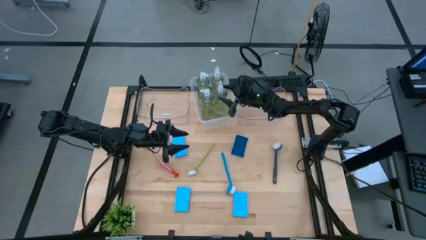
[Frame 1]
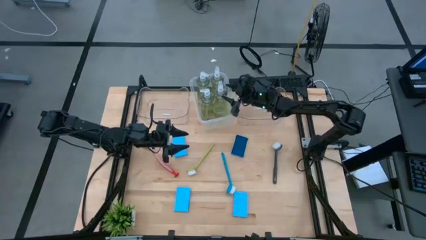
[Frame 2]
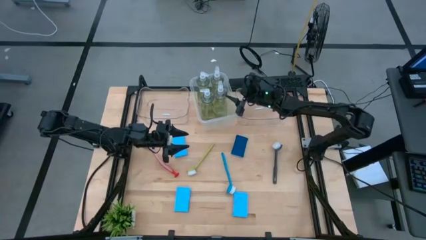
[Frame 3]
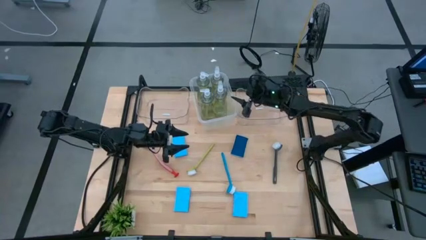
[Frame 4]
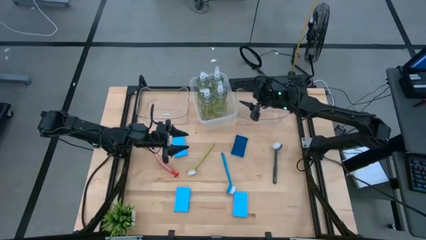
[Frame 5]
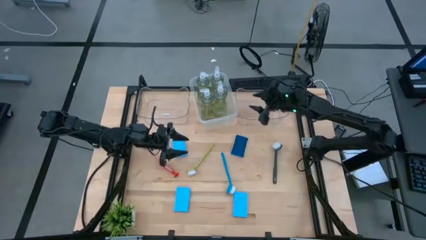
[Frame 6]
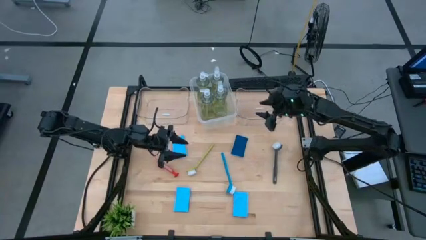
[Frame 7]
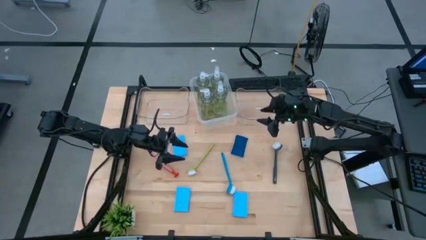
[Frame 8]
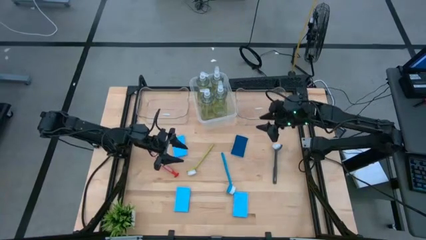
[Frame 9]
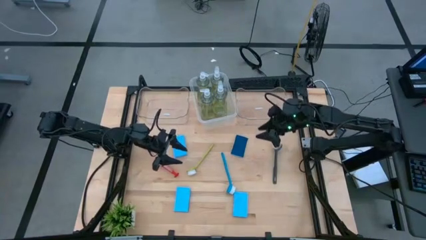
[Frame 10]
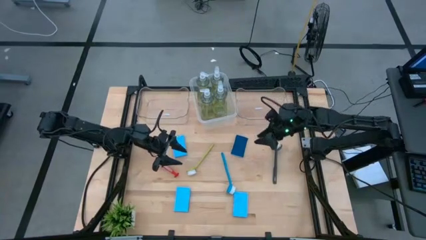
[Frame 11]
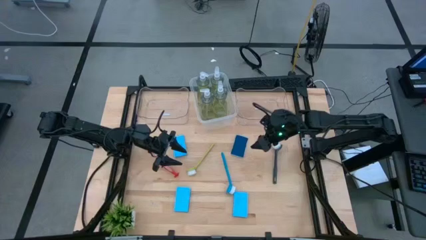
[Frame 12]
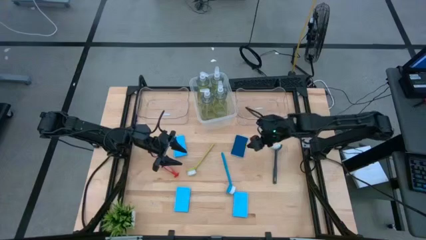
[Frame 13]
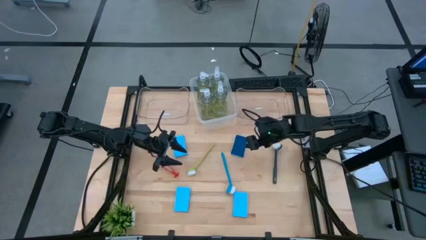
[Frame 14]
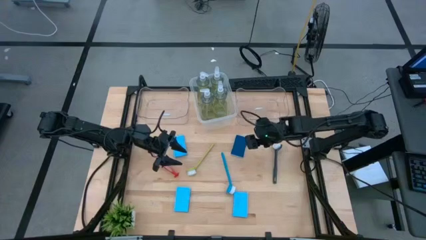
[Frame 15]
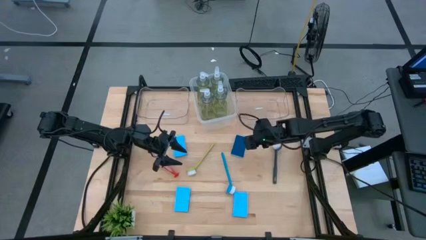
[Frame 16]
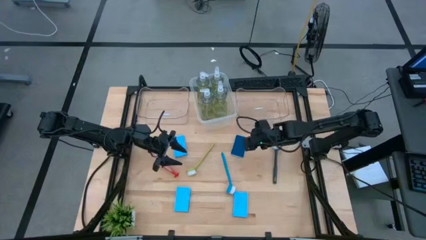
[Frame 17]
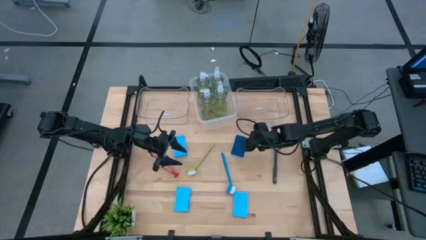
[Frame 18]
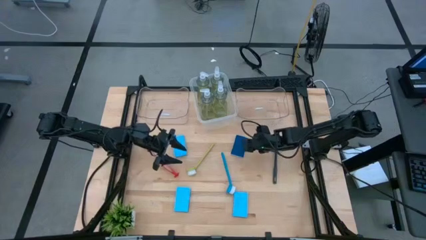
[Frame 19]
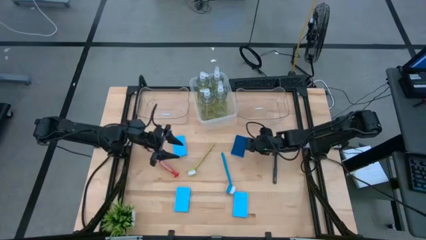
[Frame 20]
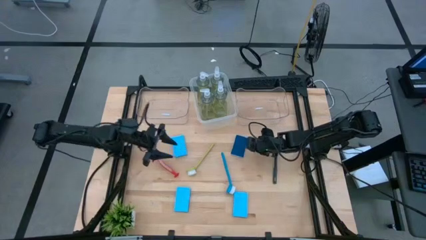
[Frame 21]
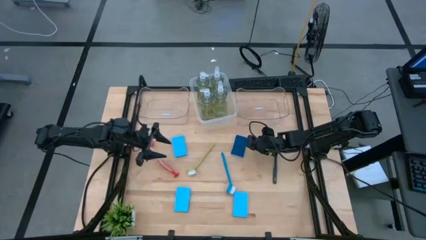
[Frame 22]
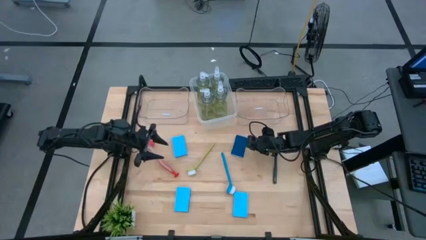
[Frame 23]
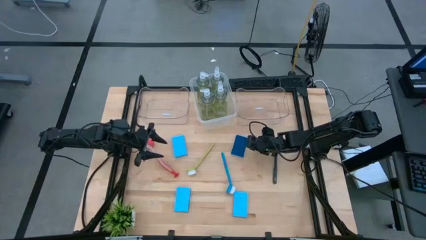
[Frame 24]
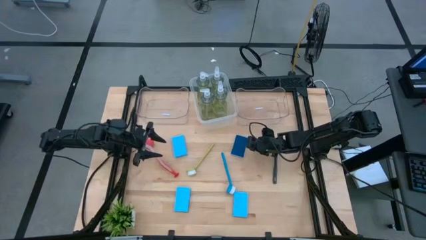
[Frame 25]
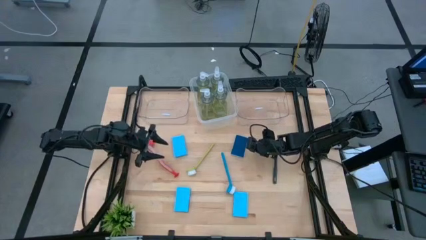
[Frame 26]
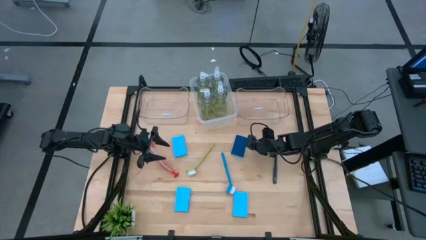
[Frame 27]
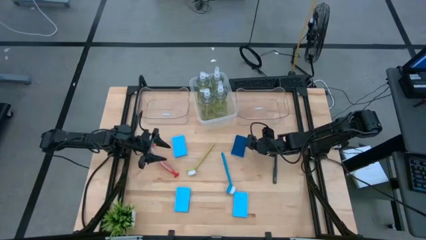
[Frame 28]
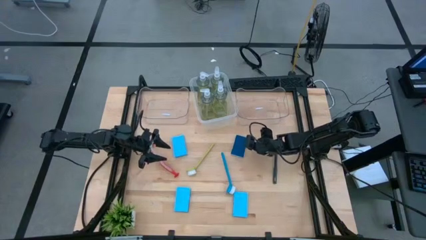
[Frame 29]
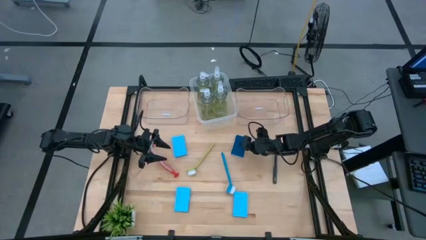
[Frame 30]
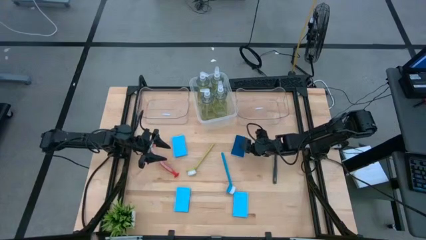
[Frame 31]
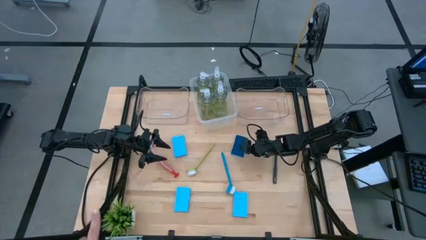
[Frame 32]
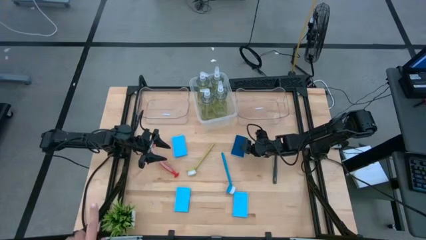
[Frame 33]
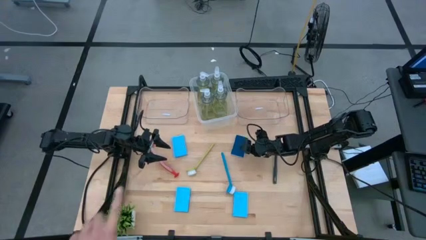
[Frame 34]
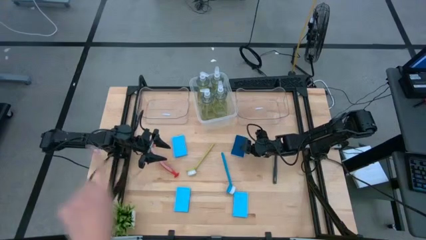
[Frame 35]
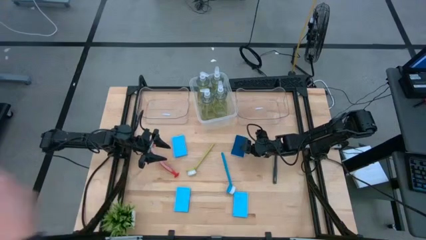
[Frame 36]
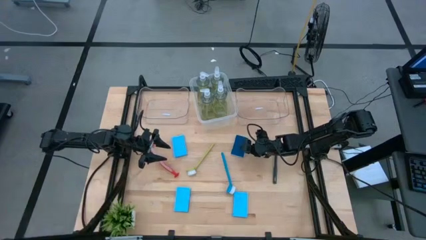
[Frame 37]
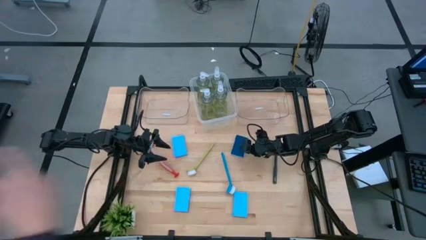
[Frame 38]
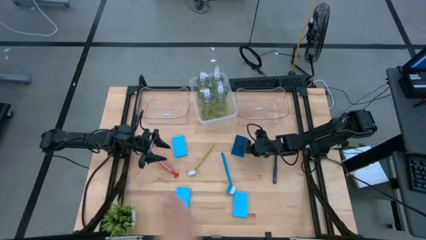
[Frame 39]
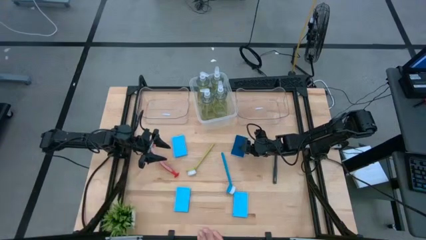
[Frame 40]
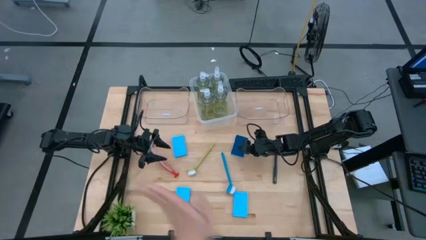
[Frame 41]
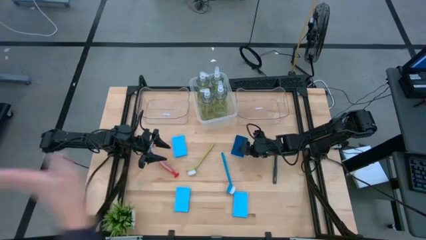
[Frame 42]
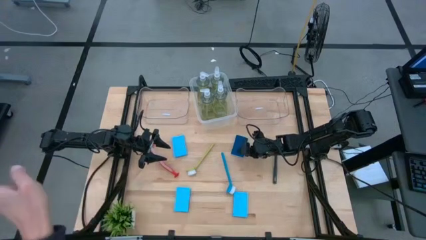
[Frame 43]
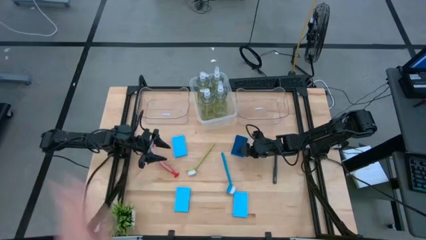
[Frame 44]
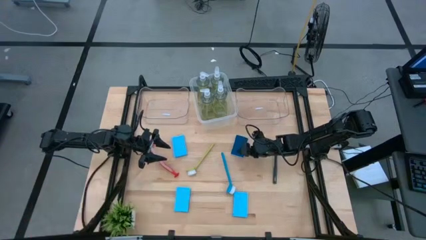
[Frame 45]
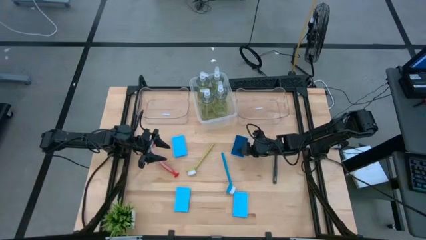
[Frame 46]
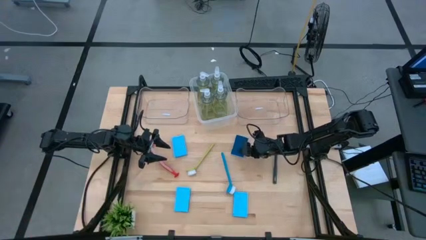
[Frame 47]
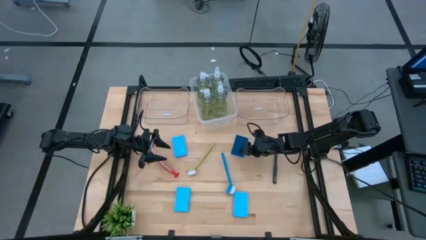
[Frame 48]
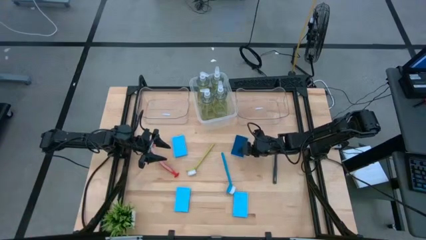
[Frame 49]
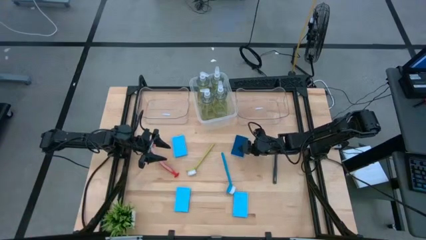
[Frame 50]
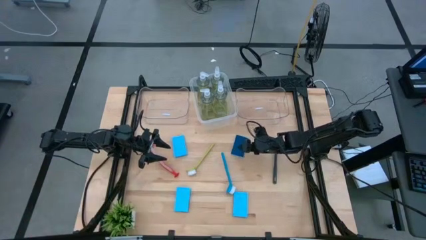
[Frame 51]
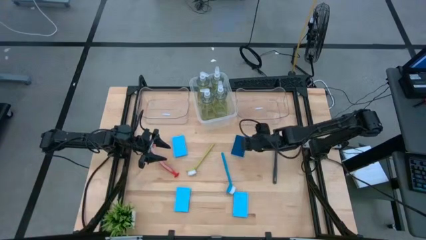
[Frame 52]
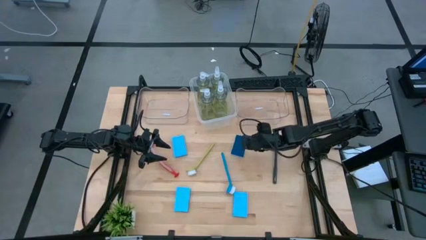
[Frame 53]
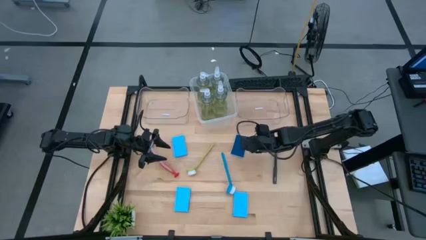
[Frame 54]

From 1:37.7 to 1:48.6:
Task: Pick & Place Kitchen Sink Supplies
Put the blue sponge into the left transparent bin

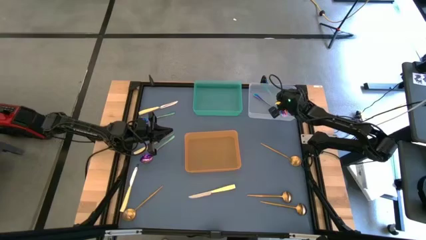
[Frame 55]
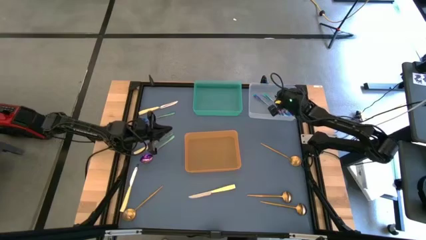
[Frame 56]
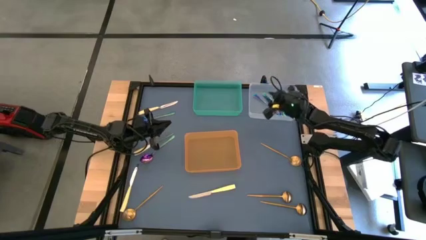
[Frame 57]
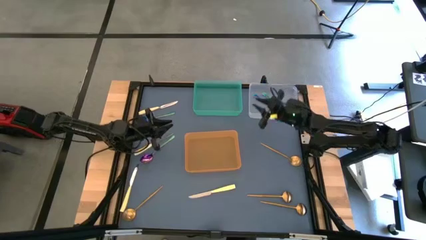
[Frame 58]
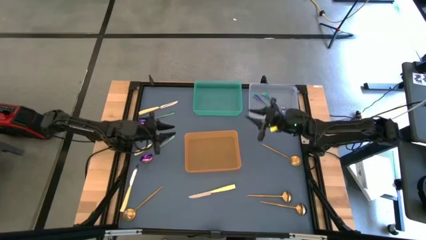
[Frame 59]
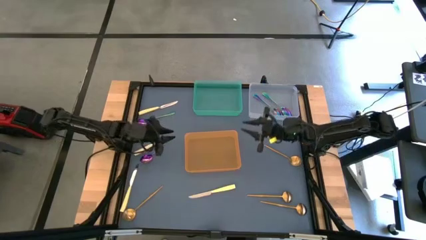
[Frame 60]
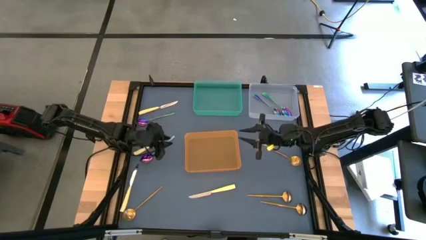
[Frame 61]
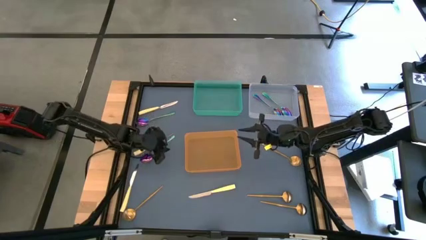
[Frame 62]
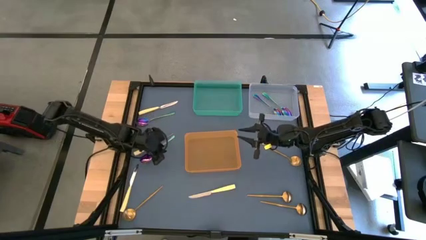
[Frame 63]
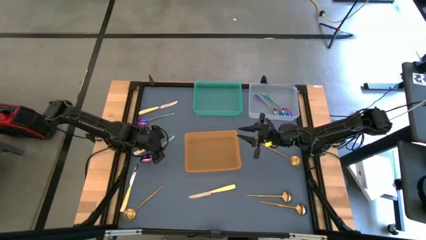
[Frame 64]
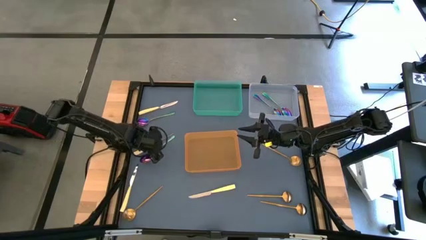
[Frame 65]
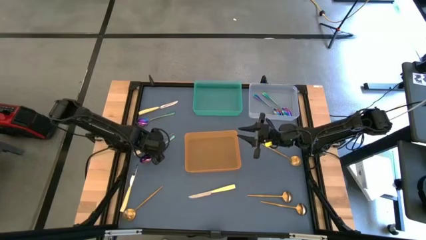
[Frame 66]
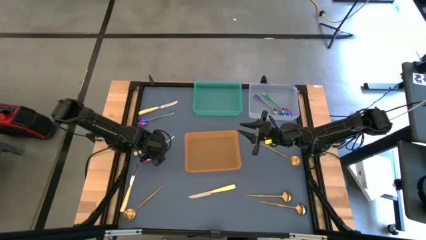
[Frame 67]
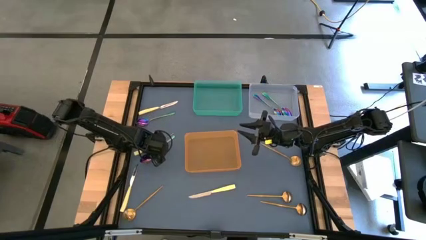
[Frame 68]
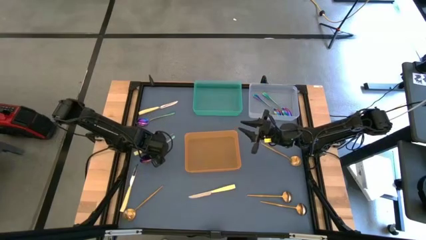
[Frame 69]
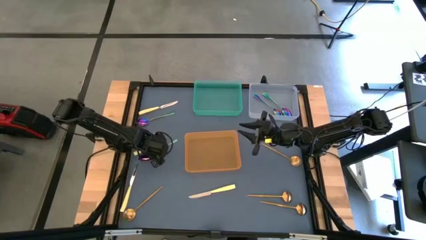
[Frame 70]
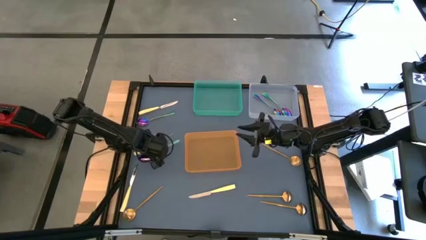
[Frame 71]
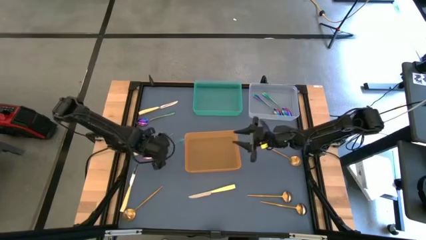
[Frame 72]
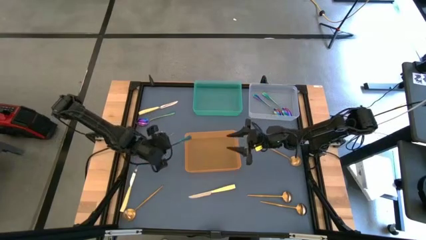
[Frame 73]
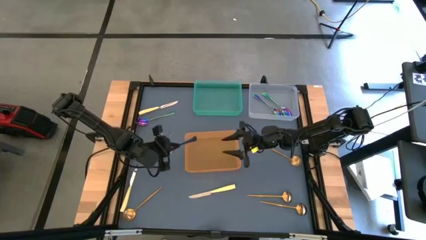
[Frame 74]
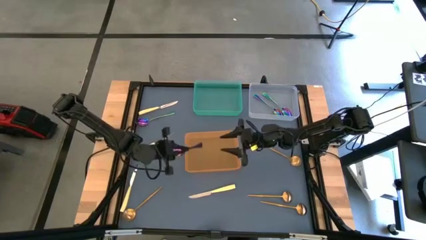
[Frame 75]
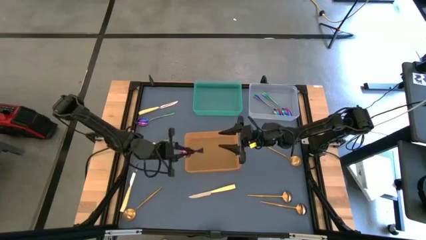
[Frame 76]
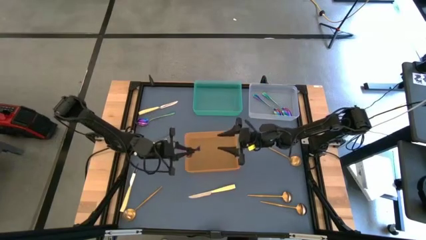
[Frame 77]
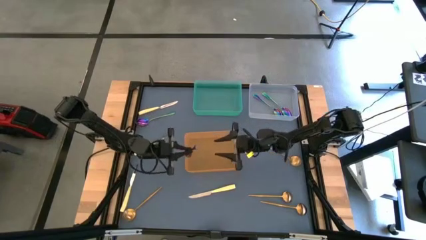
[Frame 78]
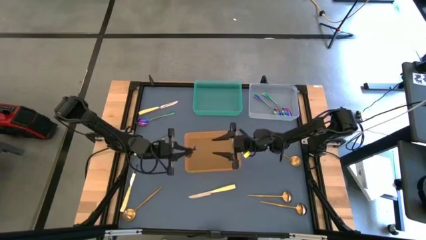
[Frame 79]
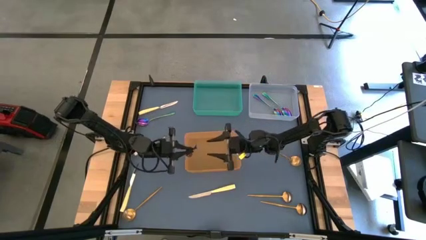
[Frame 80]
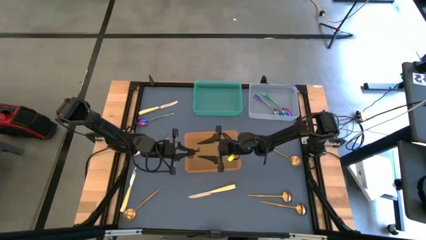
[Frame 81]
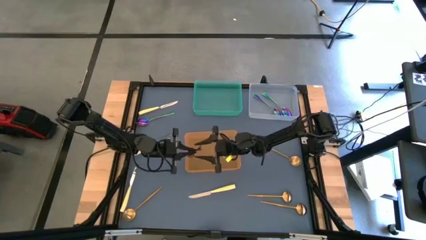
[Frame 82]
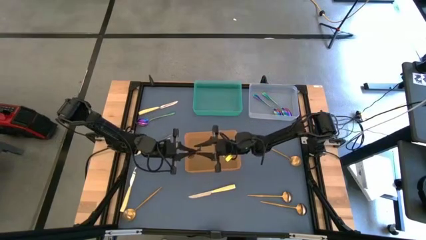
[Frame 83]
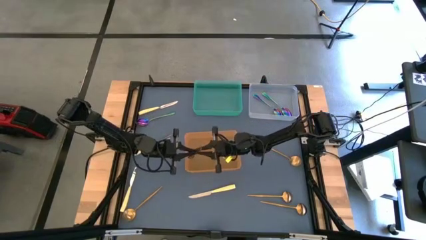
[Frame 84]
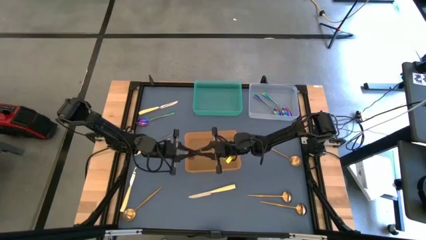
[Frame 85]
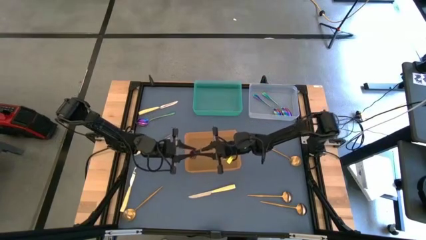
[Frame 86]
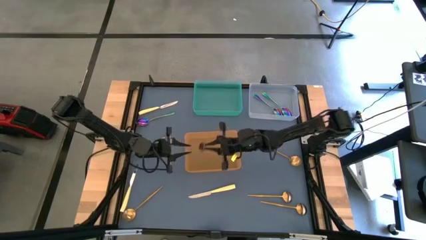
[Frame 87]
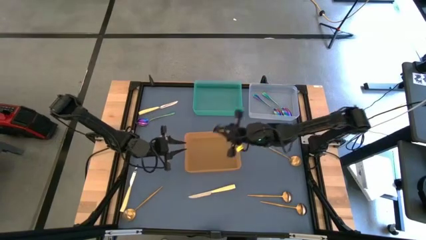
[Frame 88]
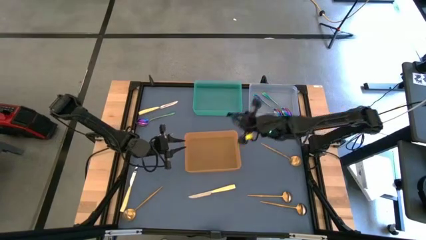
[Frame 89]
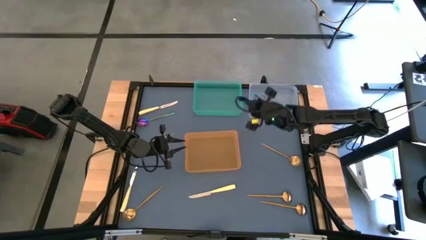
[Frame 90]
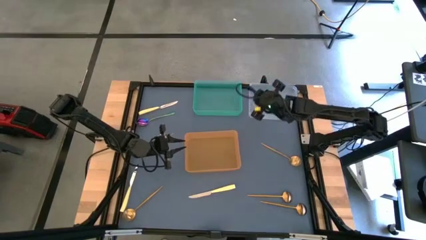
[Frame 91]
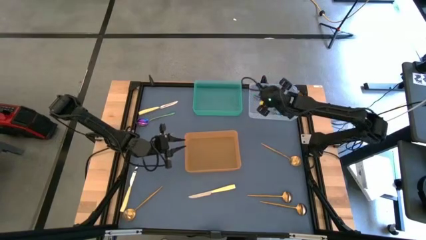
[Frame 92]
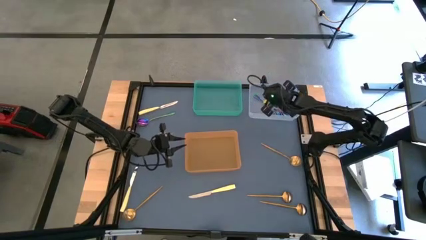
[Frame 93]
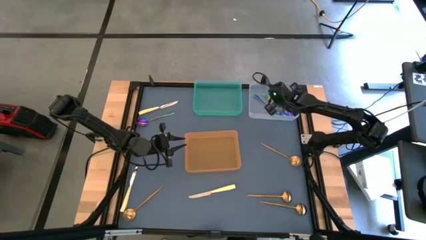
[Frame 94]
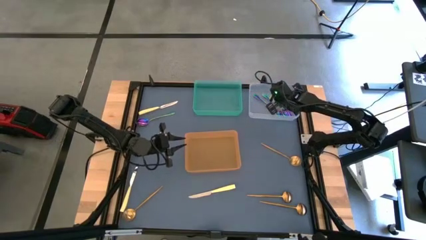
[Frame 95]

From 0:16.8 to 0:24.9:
Task: Sort silverware by color (type)
Put the blue spoon into the transparent bin
